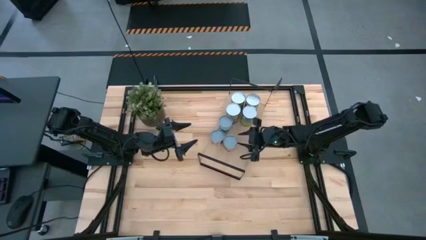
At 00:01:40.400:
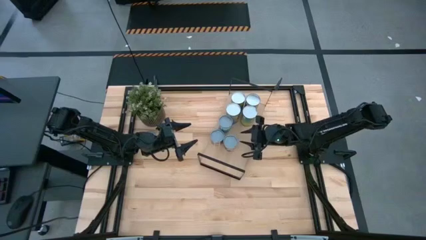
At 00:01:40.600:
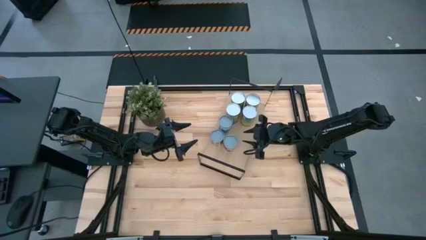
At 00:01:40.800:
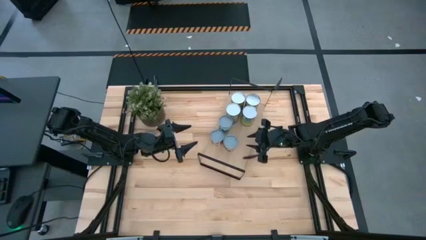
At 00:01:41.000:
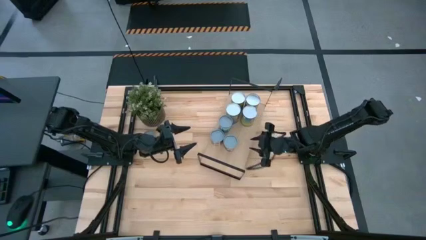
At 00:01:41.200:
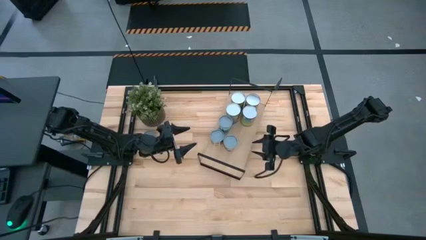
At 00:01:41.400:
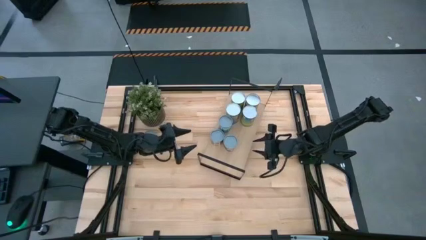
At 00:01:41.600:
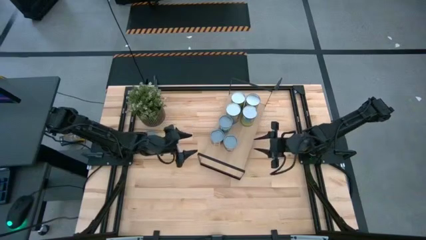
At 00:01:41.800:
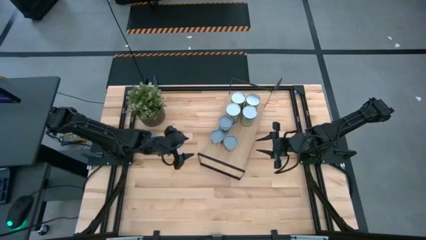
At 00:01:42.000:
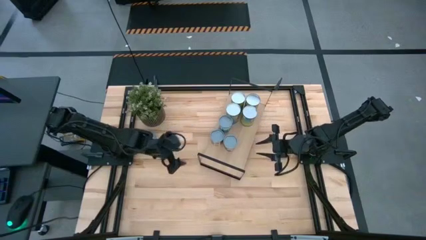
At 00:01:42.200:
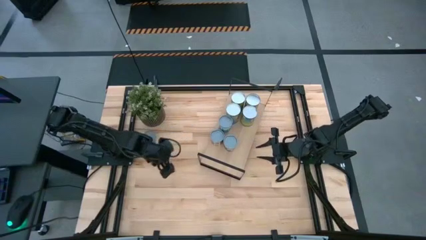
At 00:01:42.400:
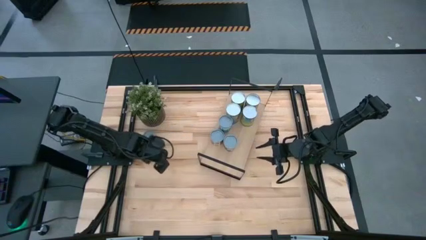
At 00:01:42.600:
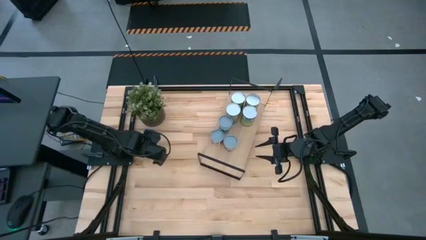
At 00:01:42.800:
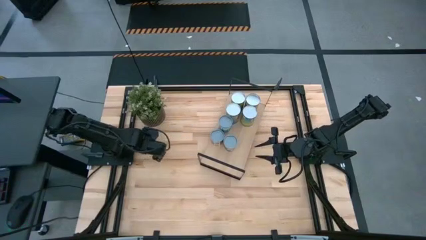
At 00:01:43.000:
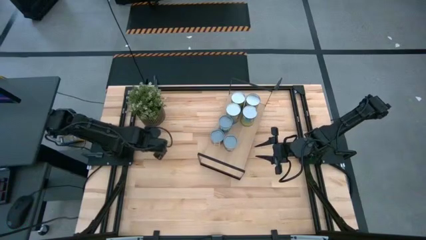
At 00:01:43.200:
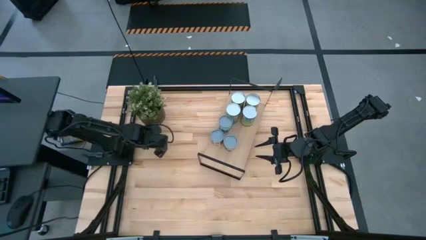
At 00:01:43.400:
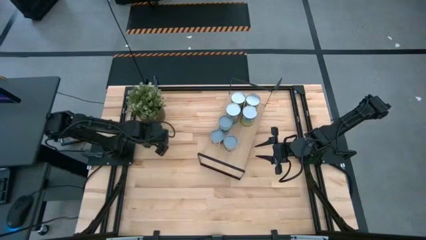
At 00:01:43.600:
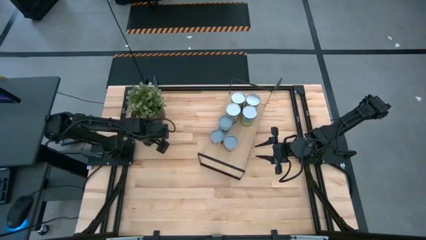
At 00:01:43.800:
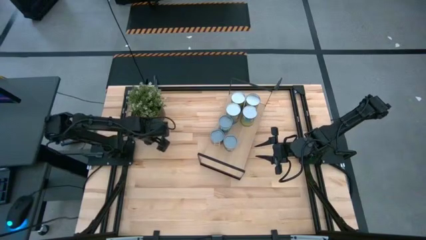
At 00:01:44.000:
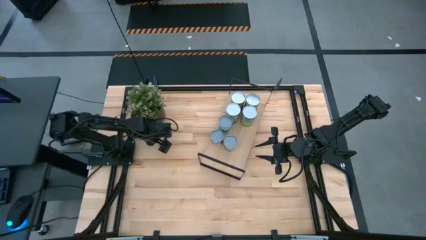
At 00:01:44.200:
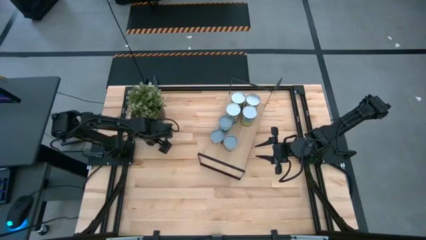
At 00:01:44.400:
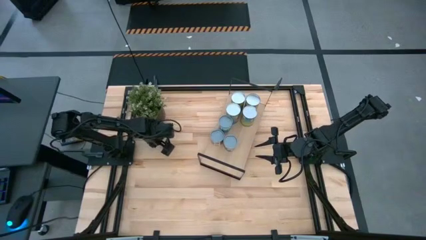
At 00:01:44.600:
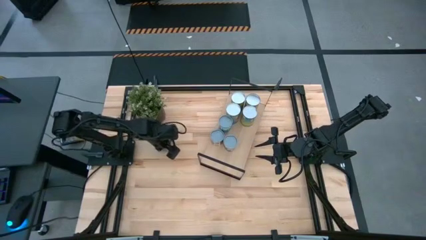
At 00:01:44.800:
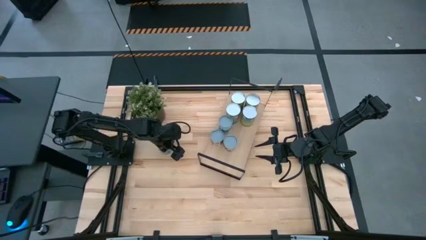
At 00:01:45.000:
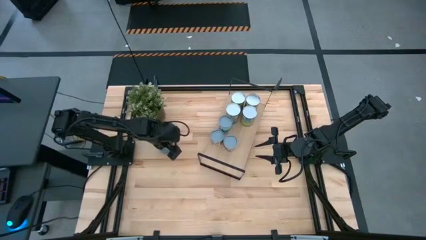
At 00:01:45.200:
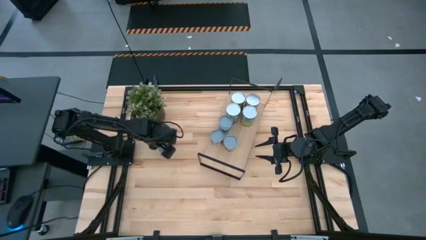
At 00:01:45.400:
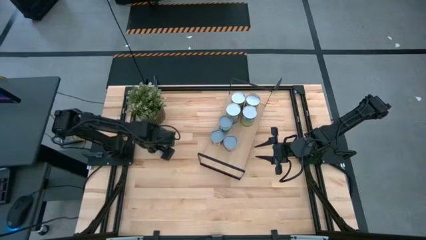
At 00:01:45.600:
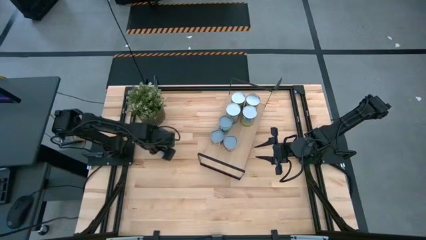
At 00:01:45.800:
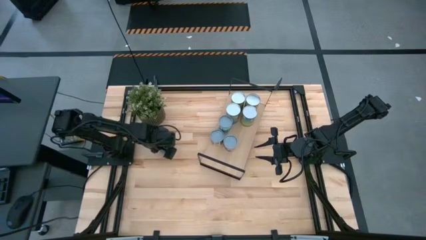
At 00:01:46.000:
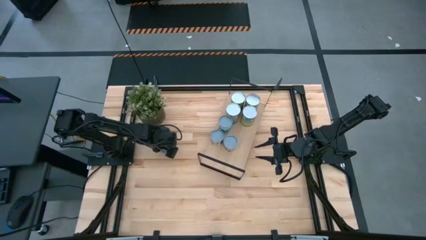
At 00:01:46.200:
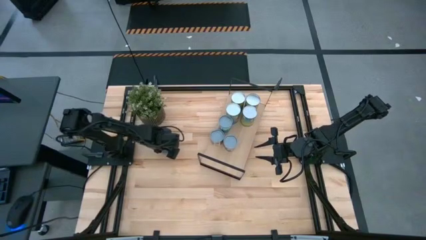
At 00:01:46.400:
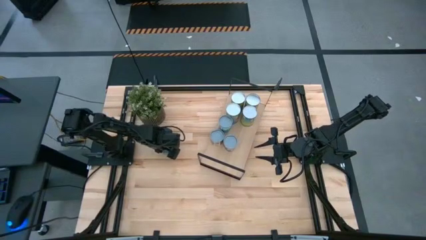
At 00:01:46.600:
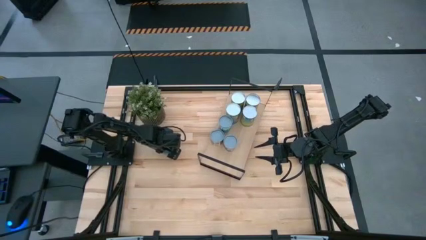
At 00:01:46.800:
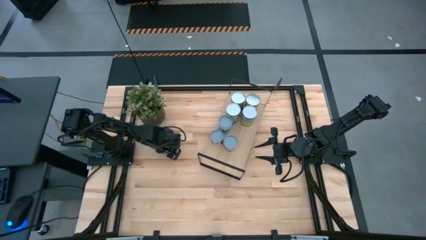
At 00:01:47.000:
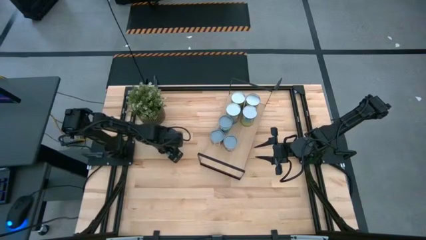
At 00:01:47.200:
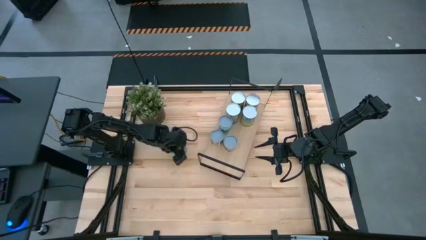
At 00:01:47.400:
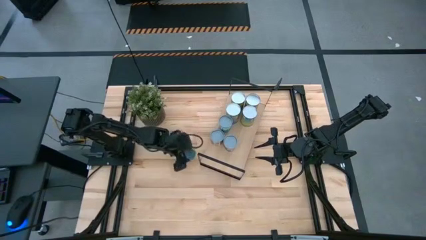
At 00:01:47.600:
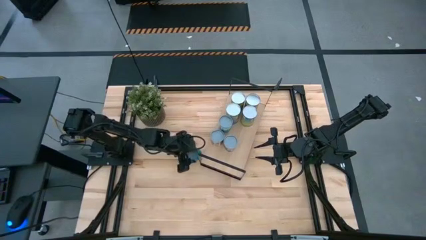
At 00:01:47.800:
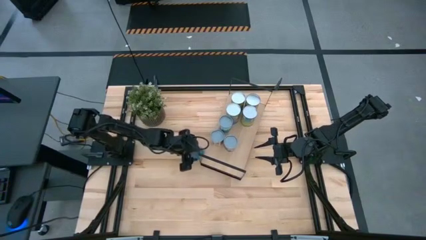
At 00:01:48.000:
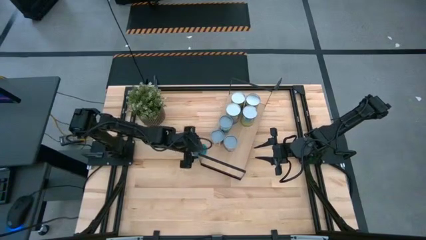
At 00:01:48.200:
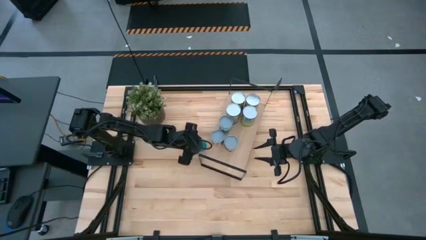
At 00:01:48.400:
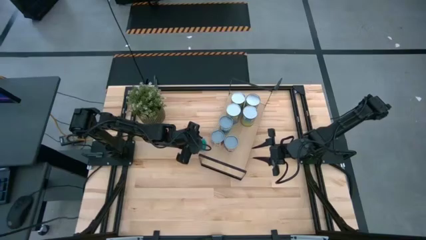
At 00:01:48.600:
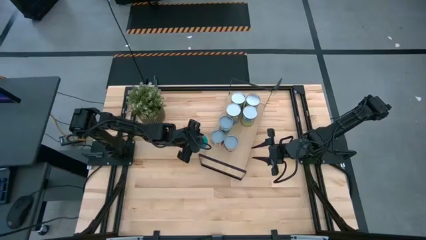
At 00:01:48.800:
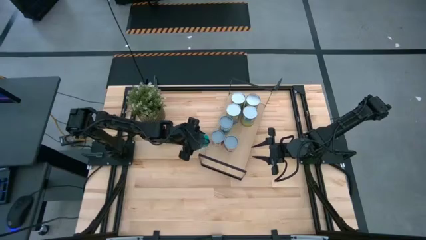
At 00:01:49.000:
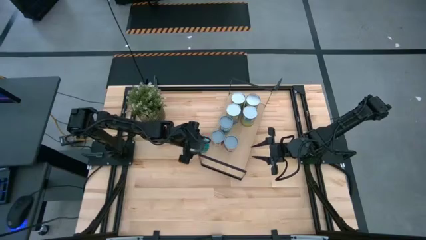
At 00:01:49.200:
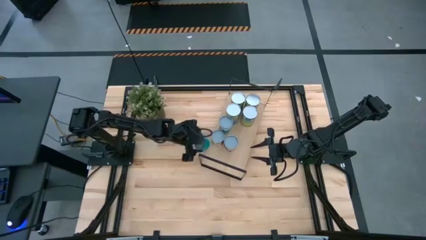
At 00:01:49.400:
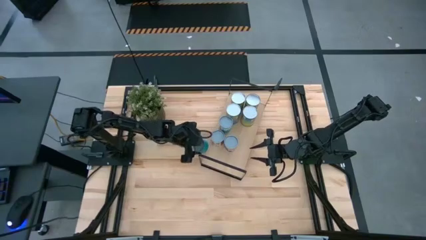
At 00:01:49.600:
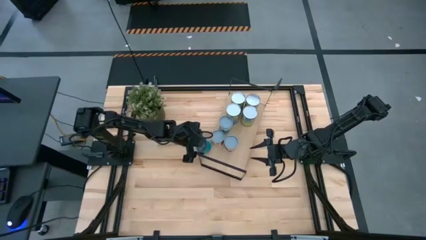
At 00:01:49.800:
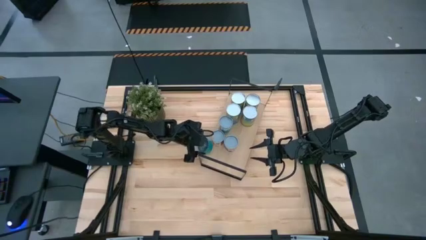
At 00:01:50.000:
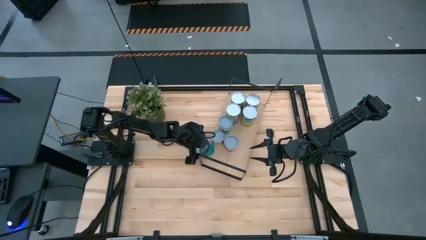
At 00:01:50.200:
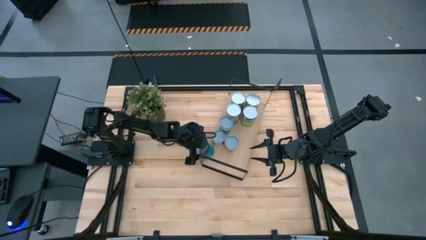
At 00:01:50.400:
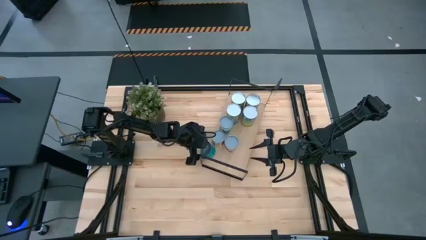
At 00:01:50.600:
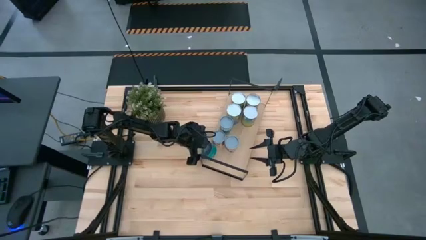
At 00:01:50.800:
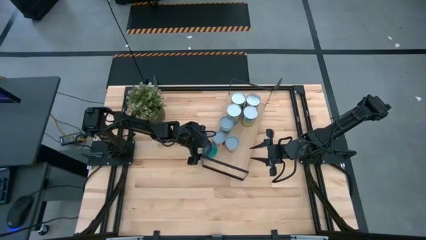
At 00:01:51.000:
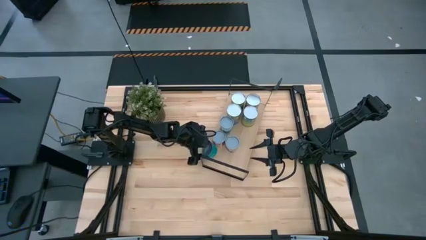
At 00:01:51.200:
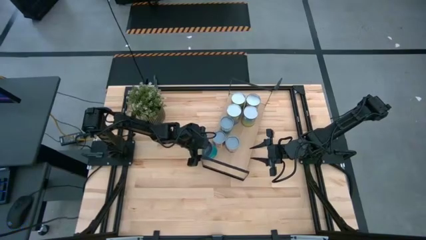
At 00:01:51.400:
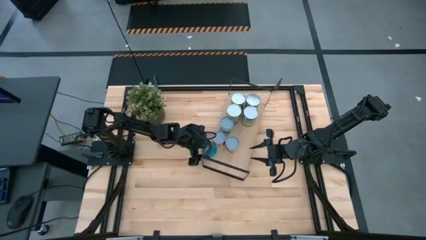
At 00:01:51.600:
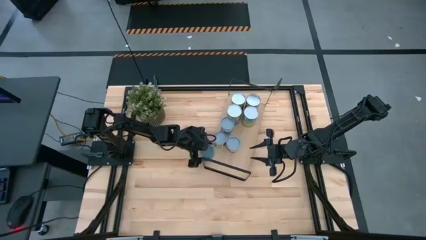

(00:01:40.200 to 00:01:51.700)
Task: Pick and place cans onto a shelf
Put the canned tuna fish on the shelf

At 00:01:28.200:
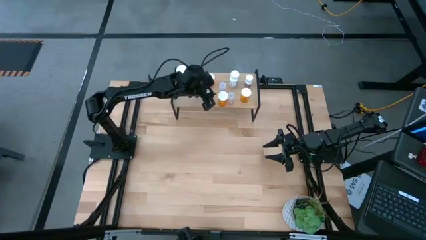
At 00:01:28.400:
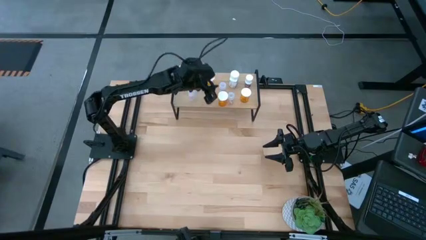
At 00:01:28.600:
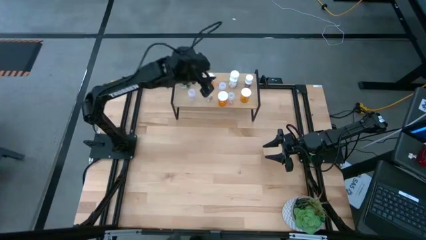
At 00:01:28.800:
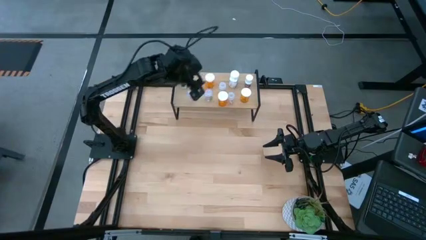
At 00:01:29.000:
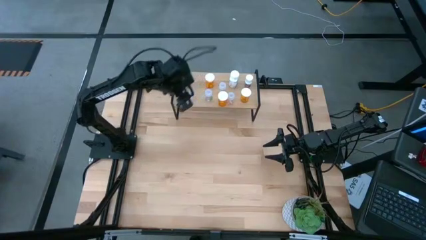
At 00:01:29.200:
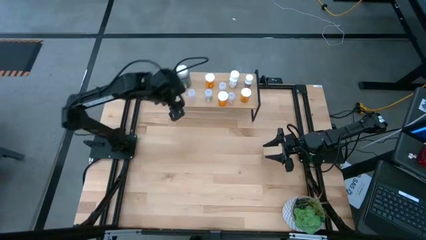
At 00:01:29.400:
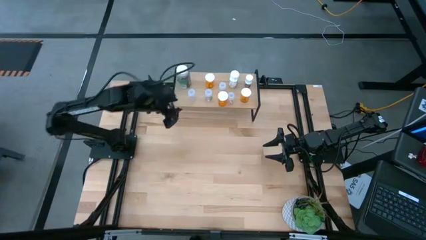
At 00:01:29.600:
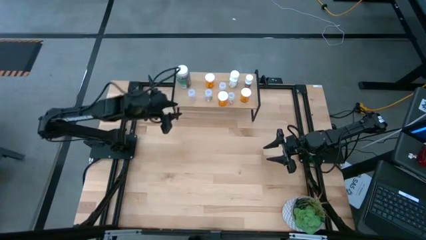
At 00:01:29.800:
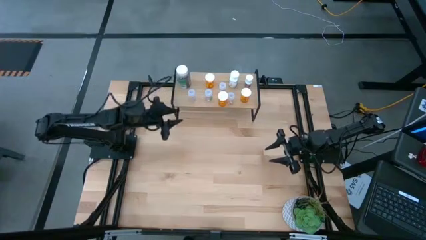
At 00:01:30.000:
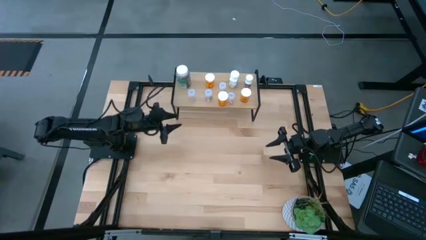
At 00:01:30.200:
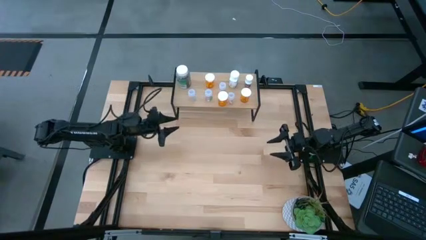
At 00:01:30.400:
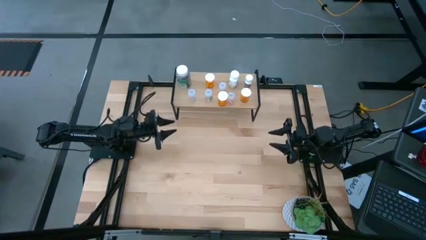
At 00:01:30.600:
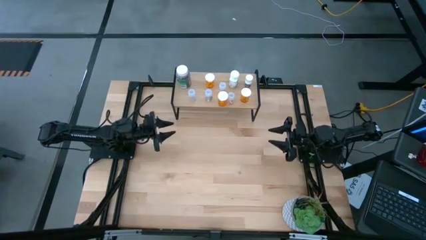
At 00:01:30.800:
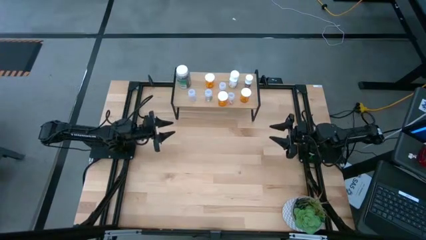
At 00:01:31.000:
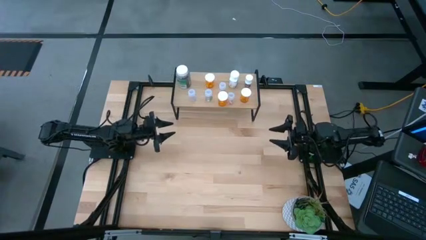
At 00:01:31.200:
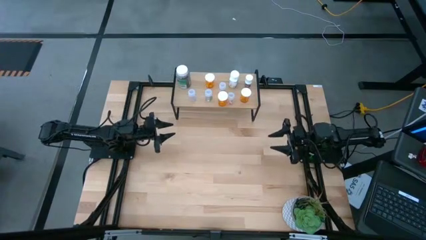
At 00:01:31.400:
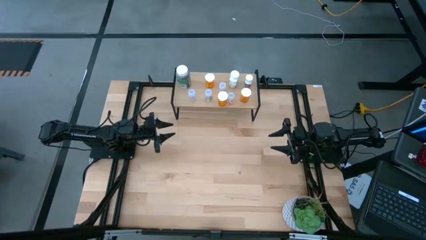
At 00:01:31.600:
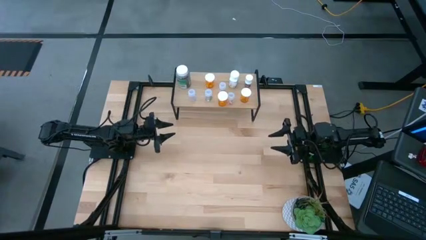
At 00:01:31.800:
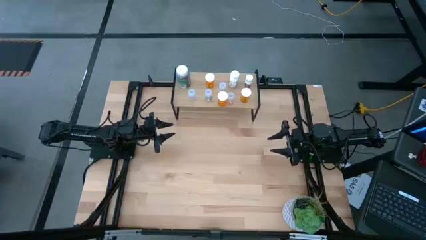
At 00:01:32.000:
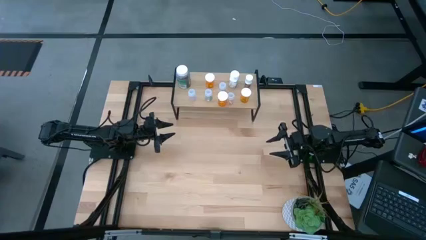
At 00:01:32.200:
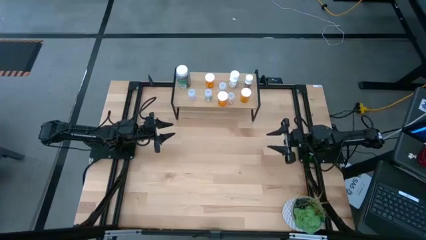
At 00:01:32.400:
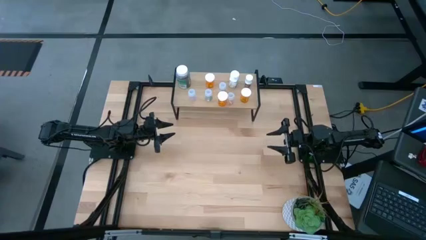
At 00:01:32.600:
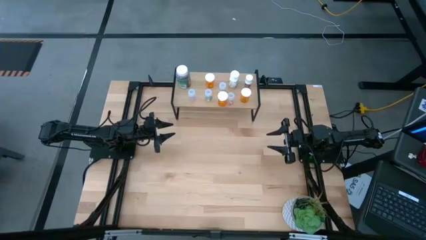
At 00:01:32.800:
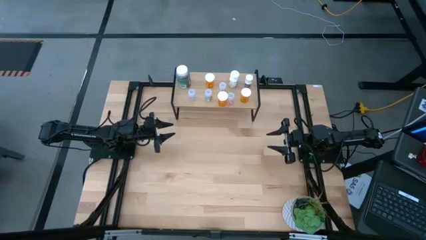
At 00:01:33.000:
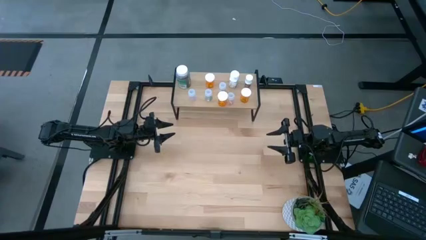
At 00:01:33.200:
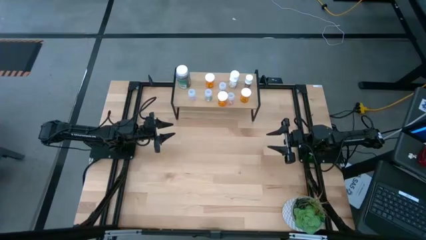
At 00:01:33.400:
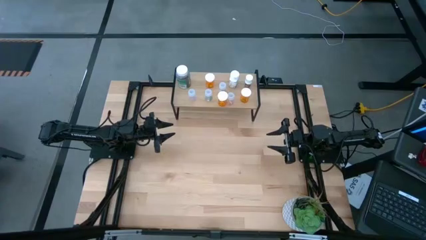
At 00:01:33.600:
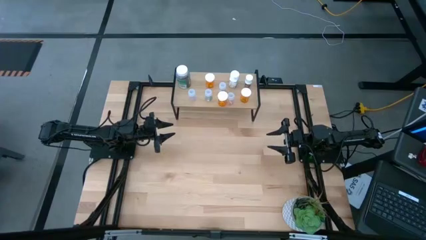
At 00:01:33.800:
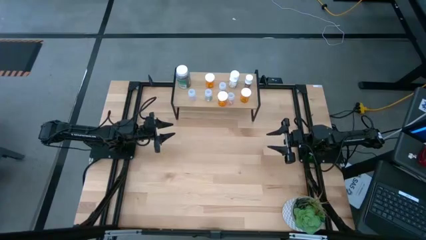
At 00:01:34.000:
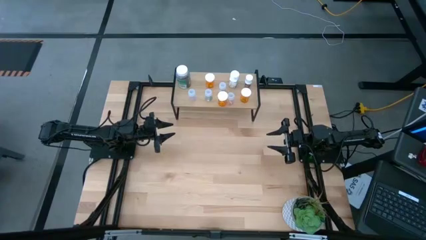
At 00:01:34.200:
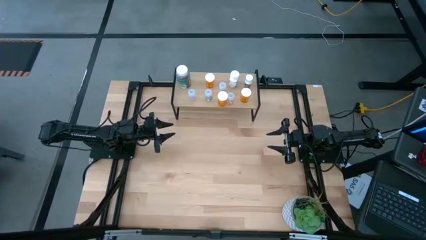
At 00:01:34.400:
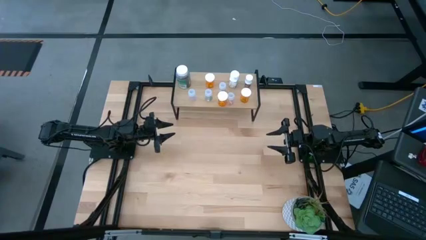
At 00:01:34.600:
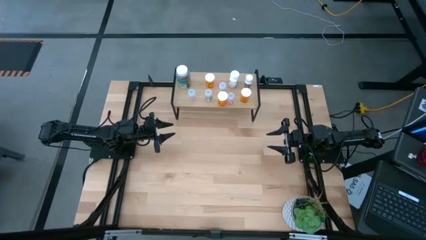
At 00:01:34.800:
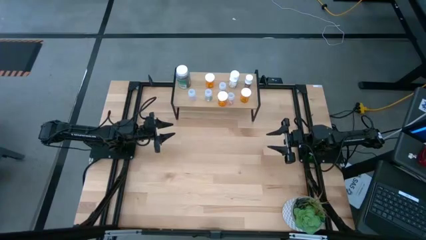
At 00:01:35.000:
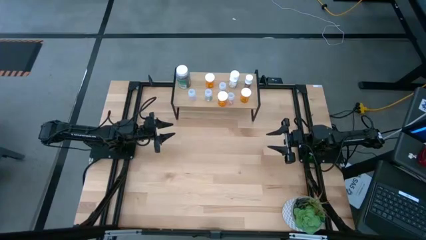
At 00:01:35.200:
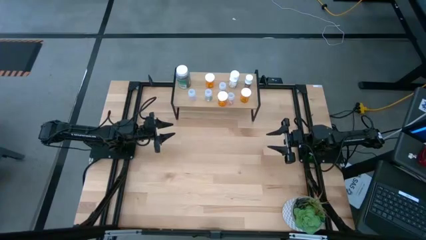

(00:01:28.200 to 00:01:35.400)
Task: Pick and place medicine bottles onto shelf by color
Return To home Position
